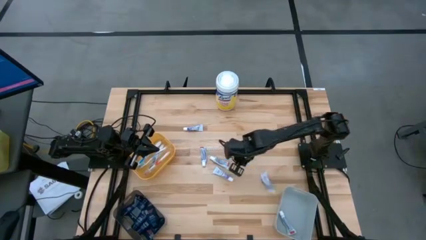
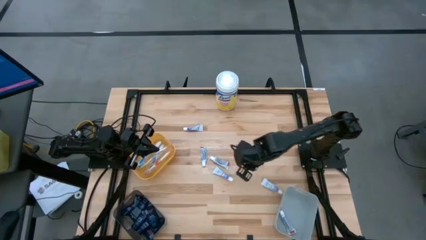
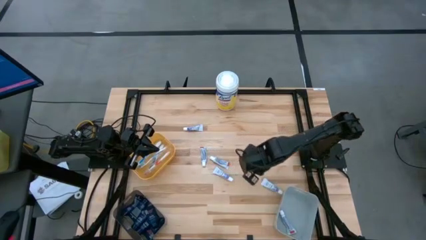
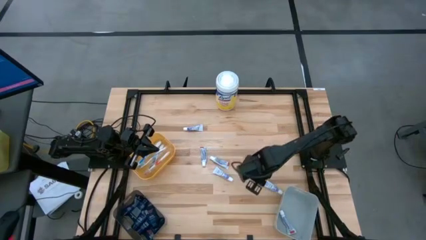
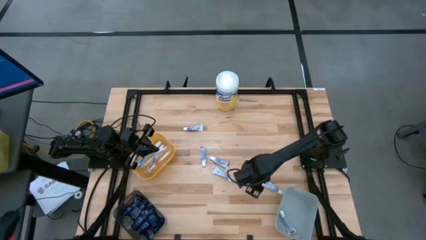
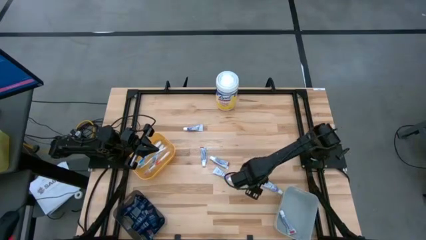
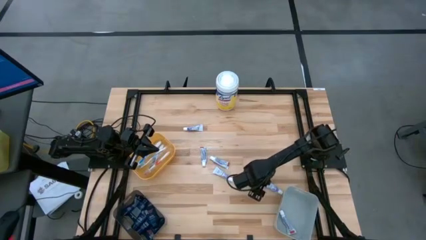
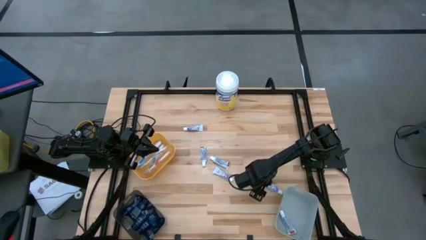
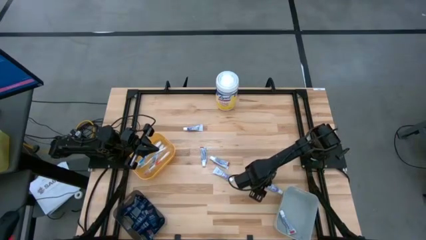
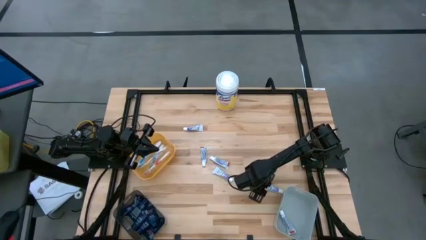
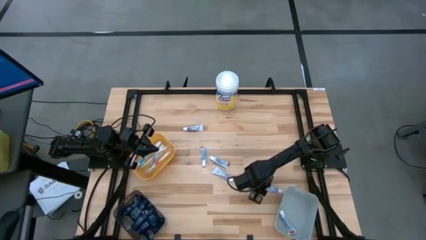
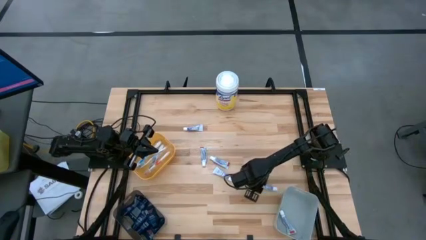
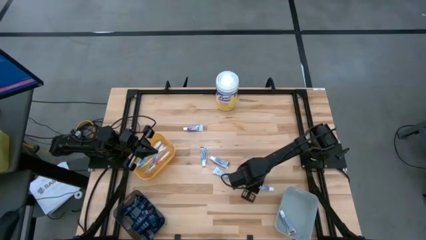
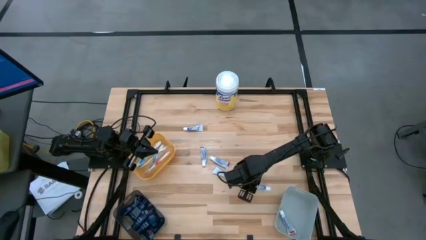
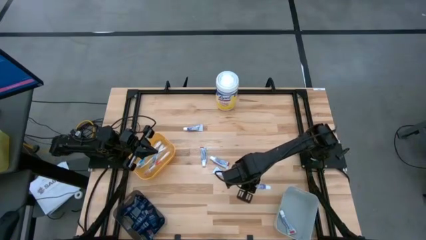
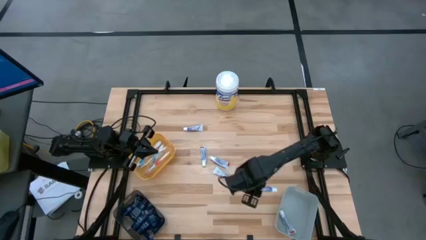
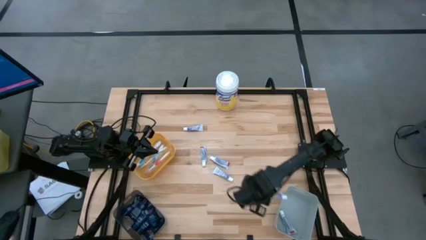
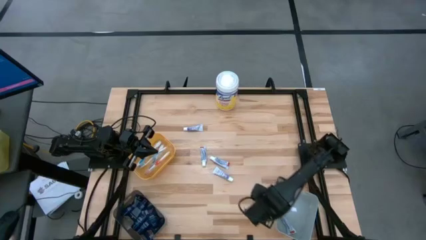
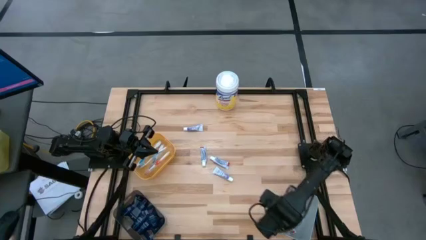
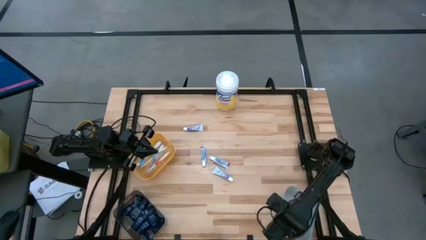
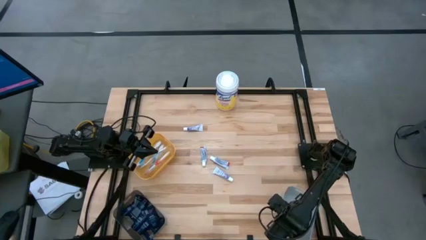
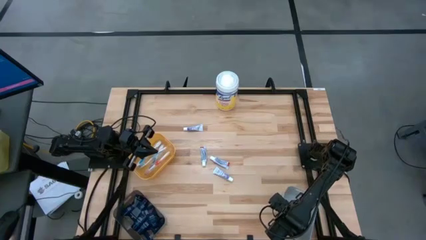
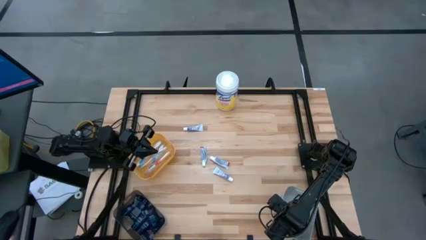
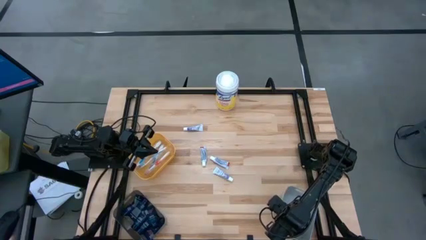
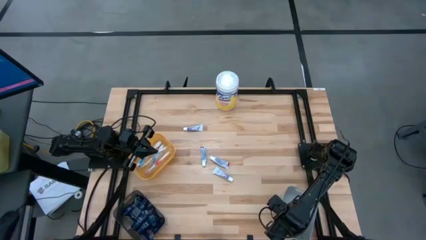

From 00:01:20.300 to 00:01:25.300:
Task: Pick & Place Travel size toiletries
Put the white toothpaste into the white bin

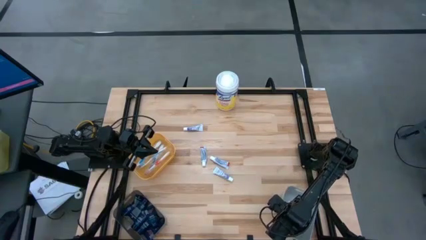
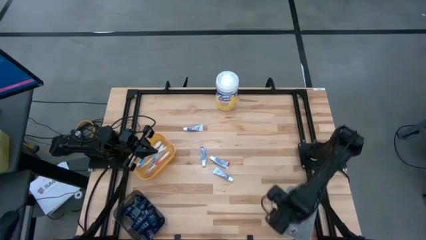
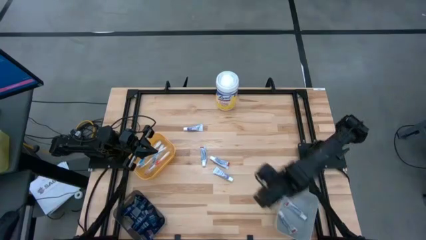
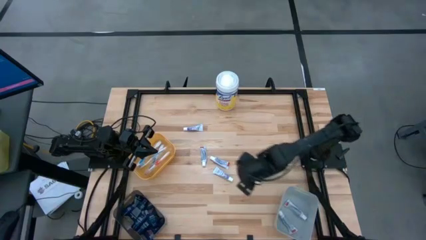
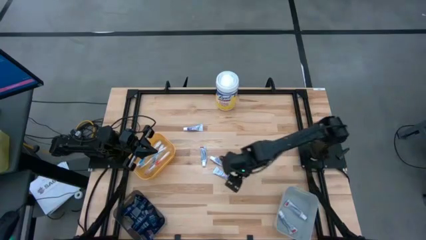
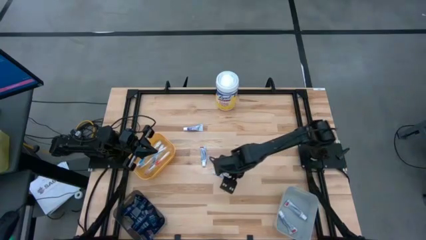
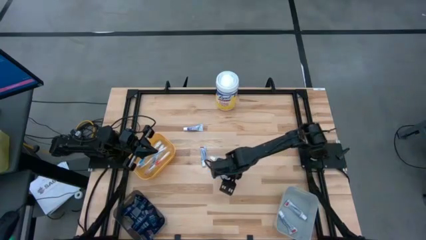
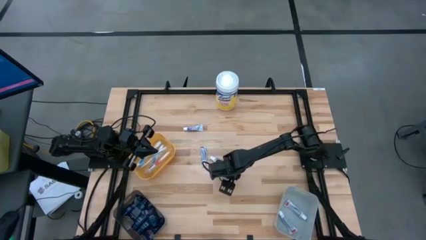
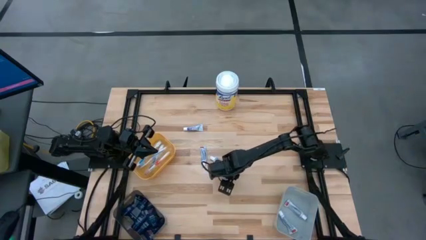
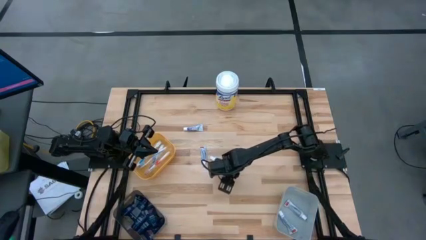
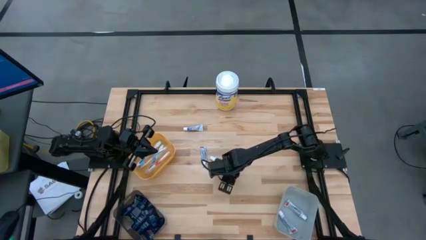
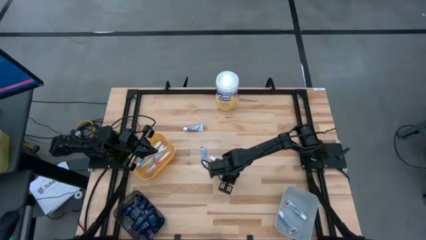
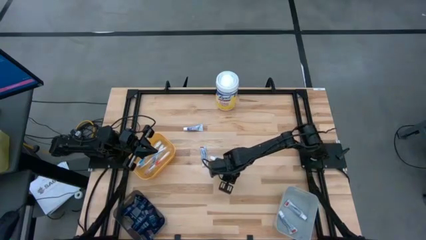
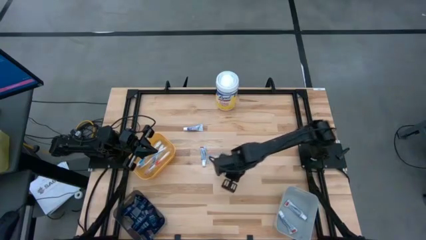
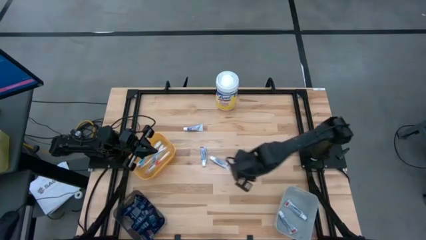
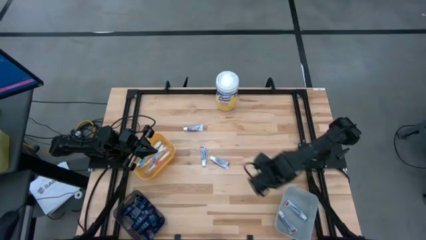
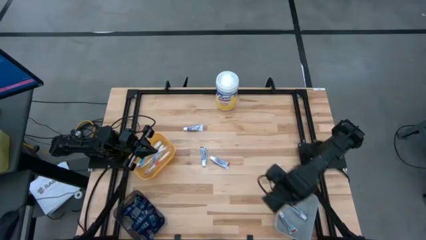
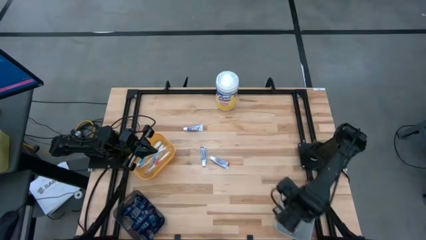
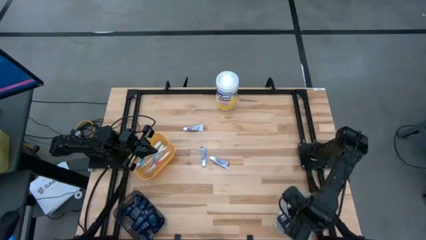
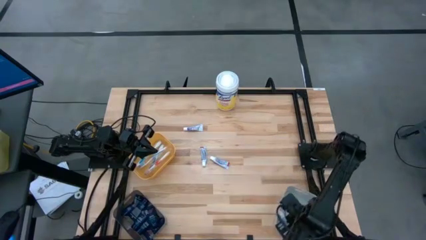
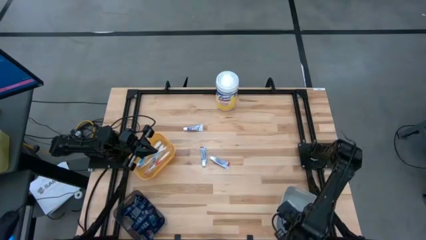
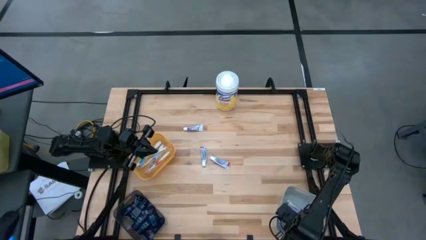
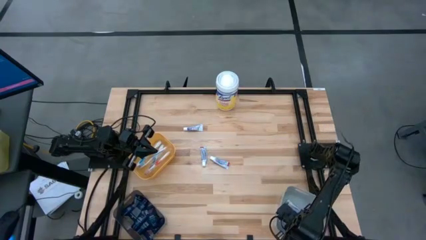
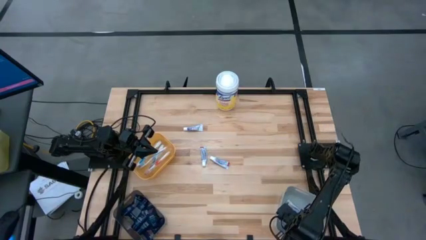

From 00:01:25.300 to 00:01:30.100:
Put the white toothpaste into the white bin

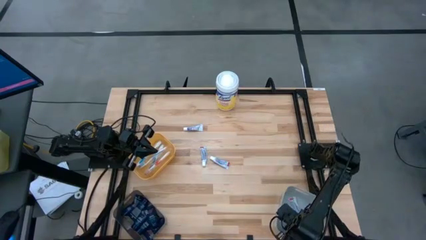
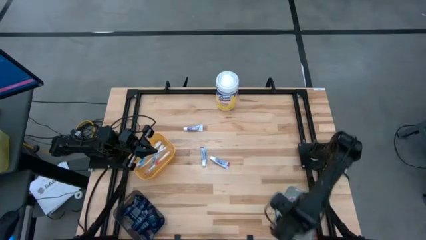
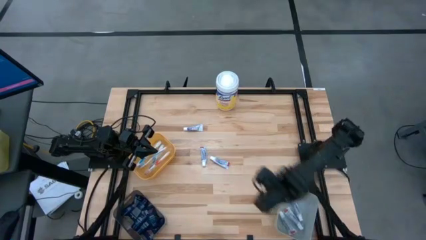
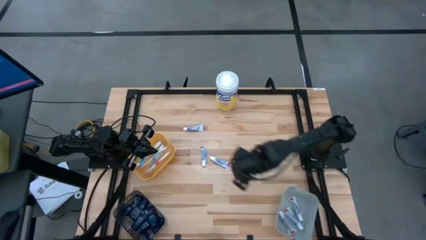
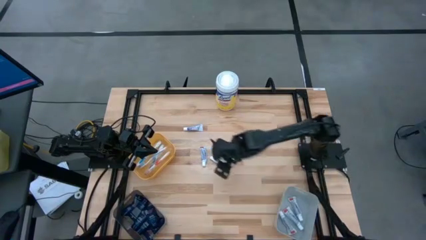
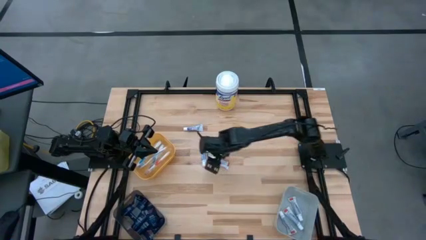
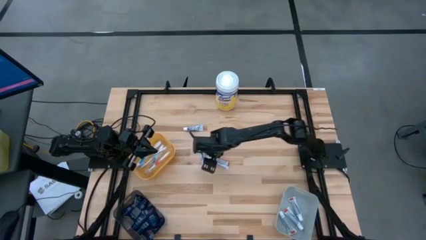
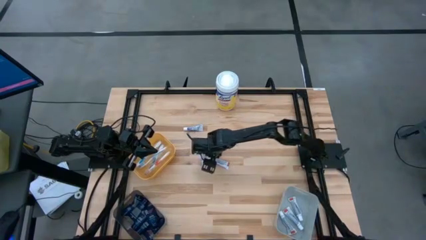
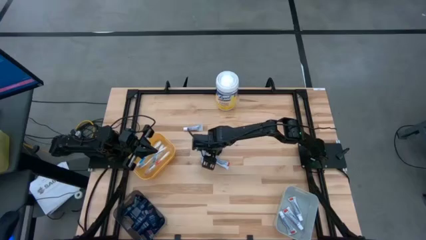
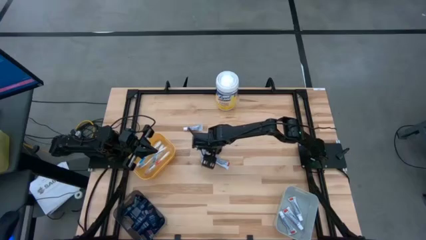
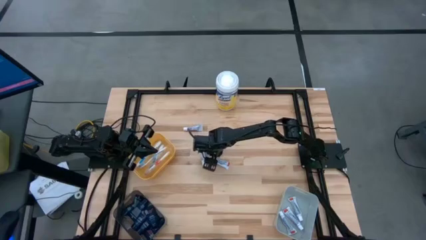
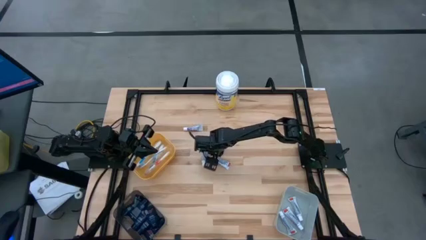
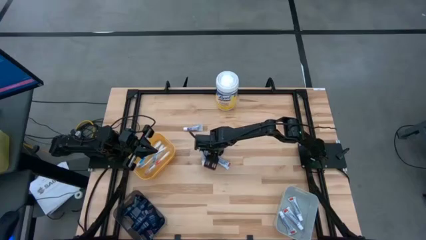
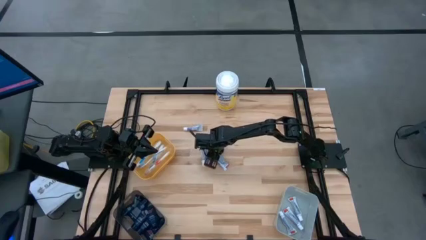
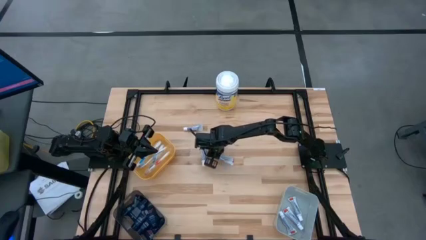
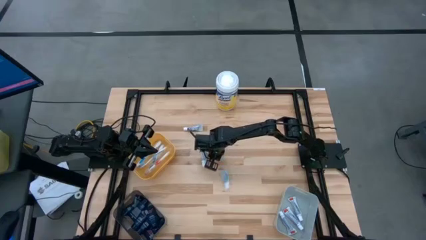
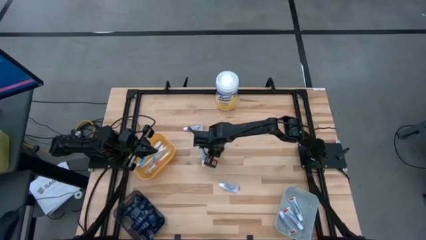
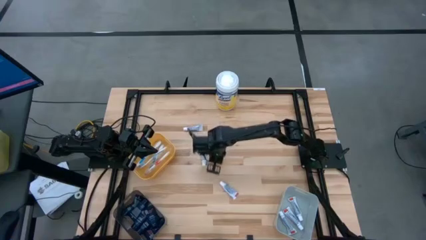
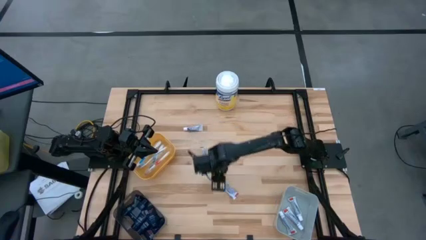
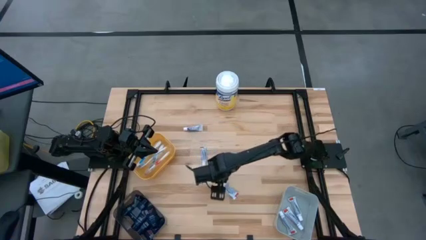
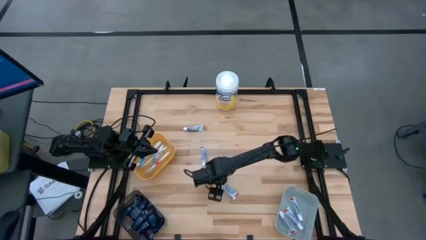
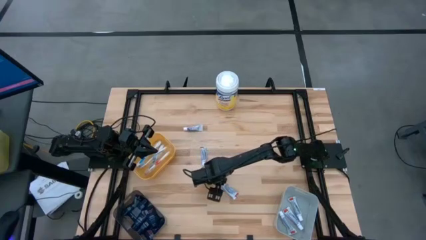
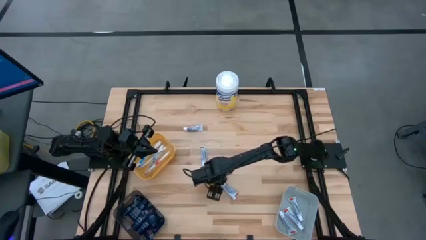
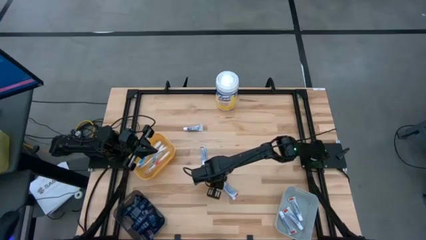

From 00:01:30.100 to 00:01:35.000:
Put the white toothpaste into the white bin

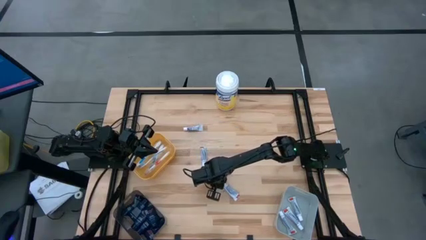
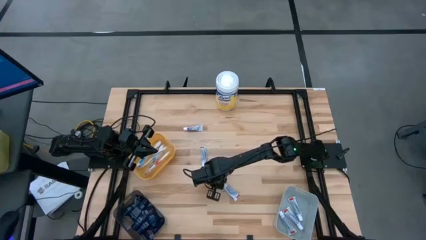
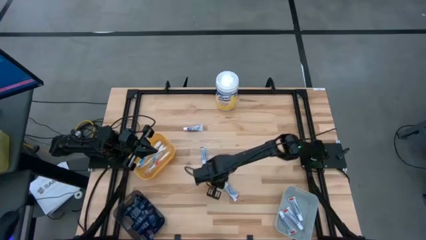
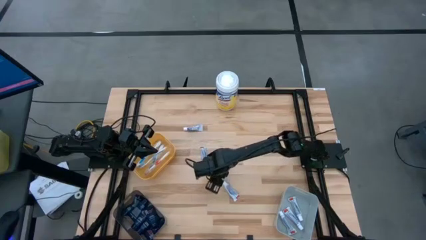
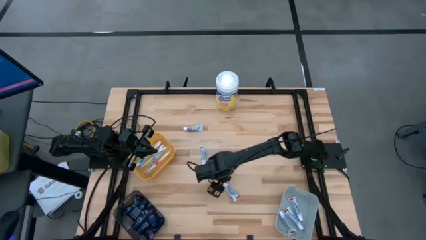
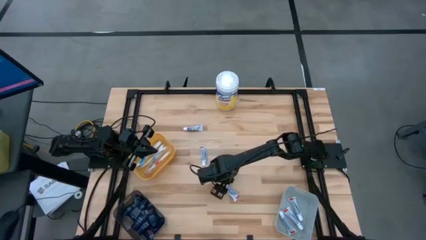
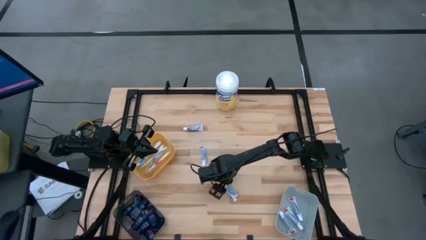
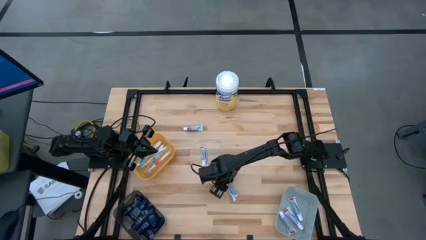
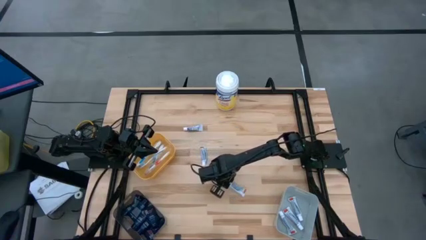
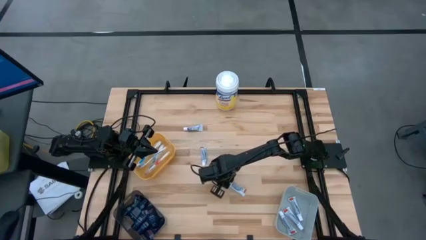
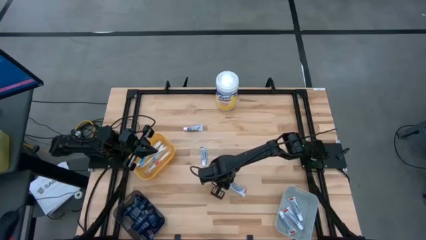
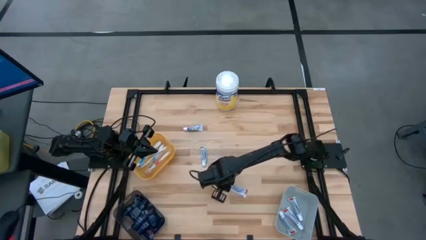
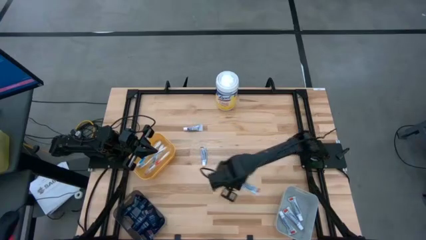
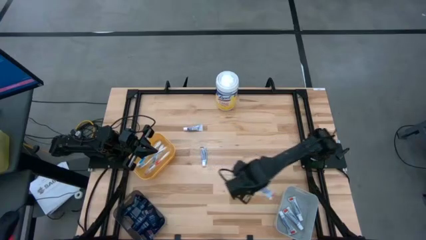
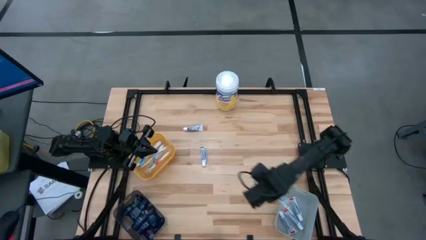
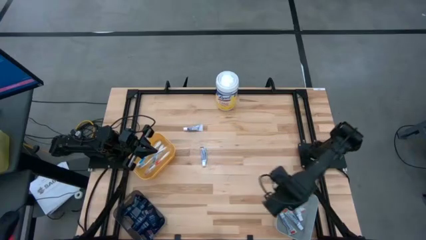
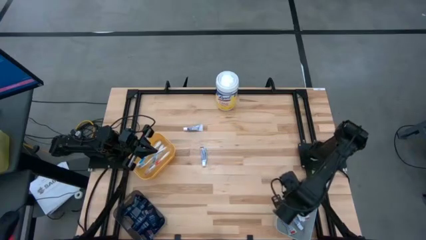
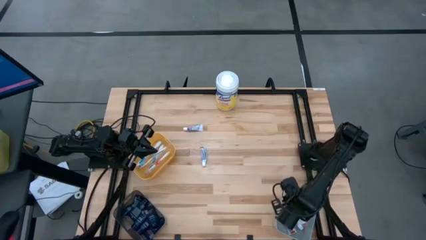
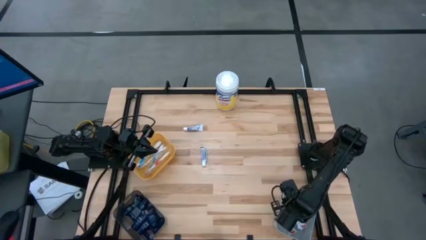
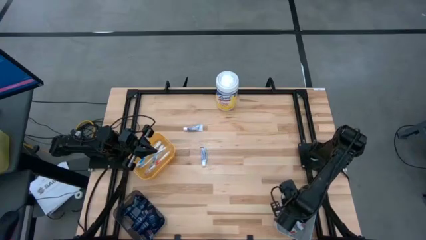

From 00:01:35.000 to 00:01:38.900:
Put the white toothpaste into the white bin
